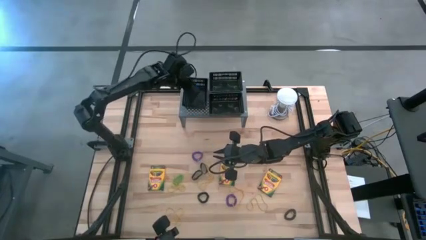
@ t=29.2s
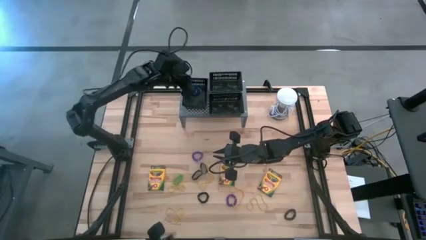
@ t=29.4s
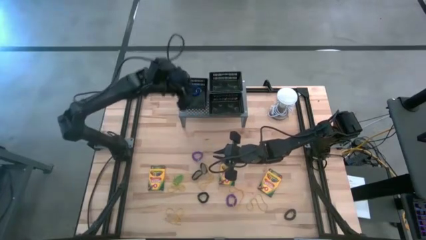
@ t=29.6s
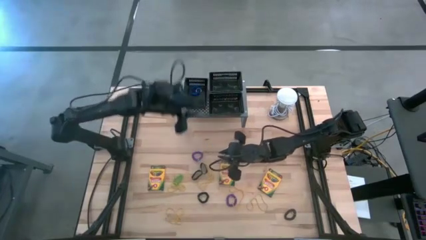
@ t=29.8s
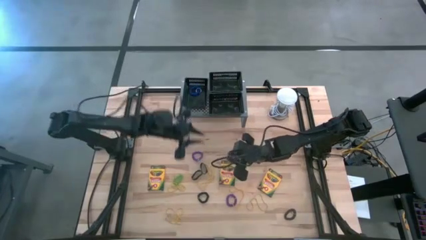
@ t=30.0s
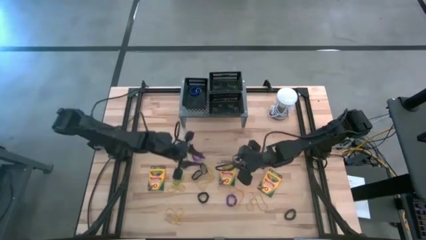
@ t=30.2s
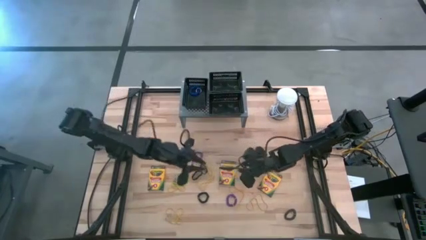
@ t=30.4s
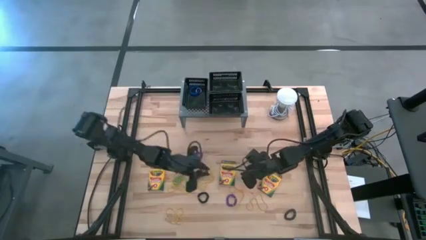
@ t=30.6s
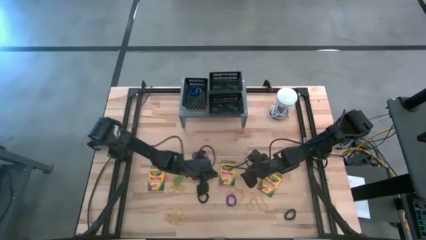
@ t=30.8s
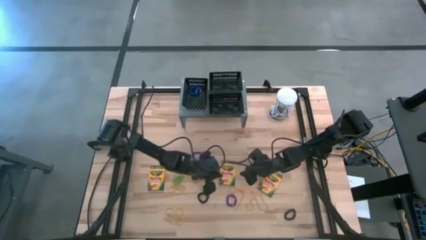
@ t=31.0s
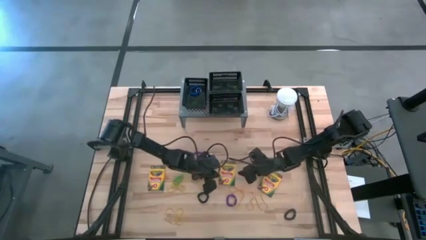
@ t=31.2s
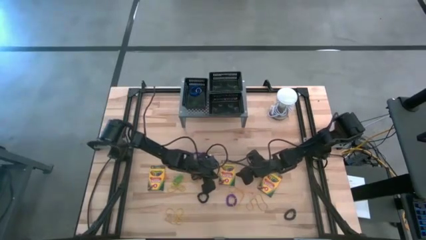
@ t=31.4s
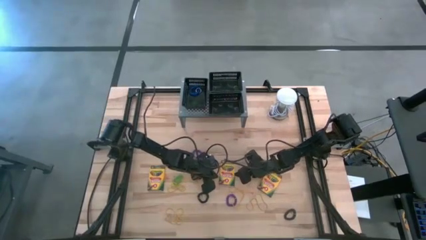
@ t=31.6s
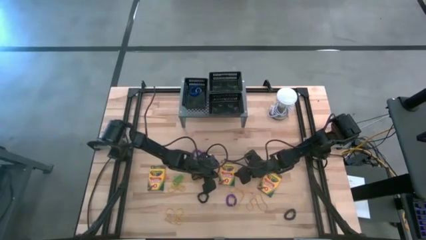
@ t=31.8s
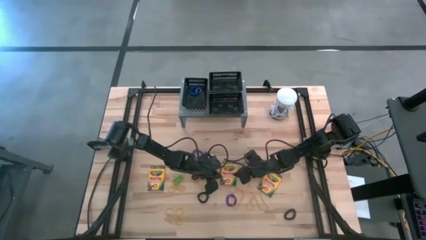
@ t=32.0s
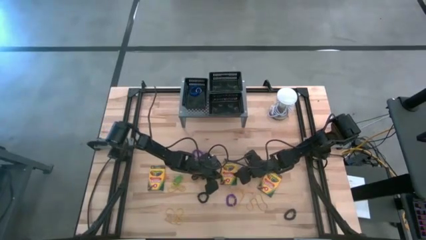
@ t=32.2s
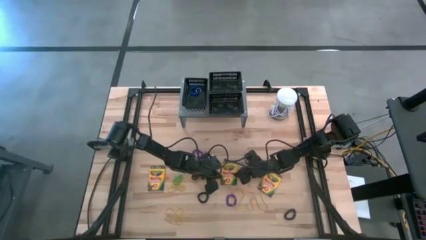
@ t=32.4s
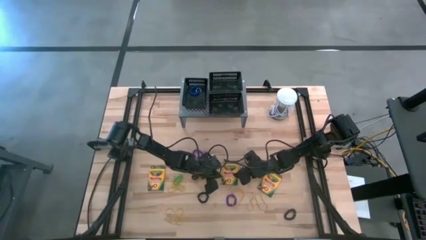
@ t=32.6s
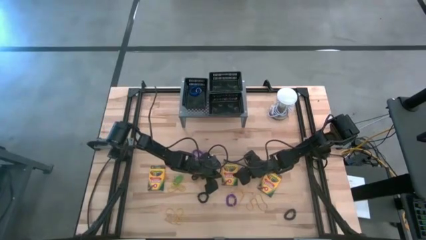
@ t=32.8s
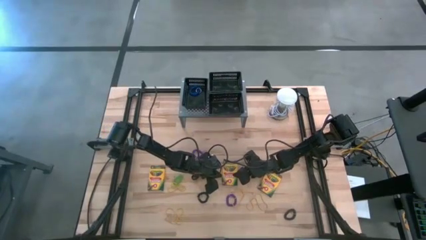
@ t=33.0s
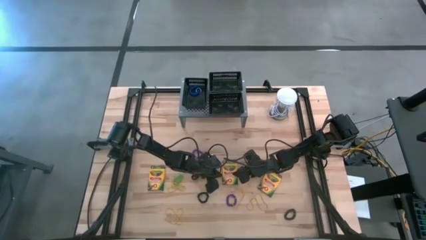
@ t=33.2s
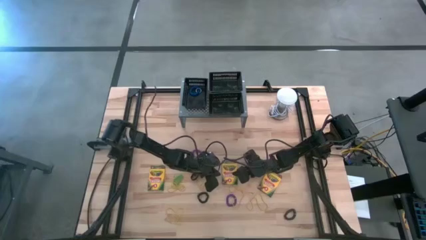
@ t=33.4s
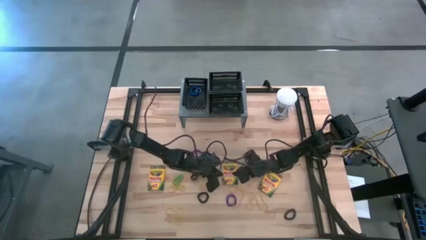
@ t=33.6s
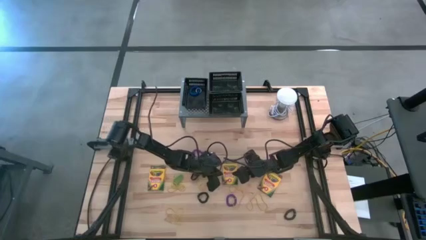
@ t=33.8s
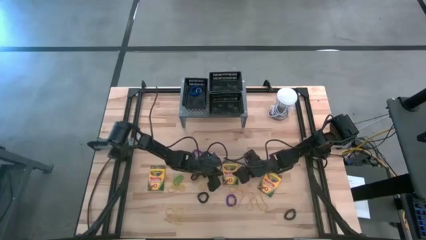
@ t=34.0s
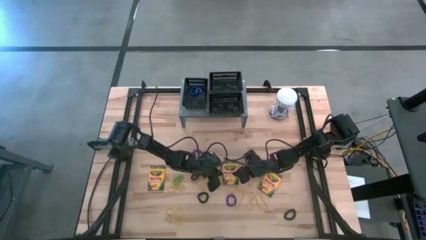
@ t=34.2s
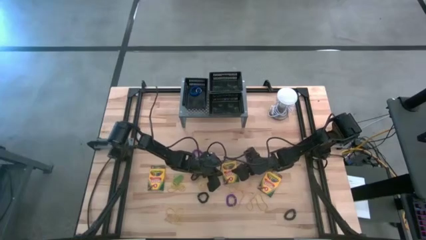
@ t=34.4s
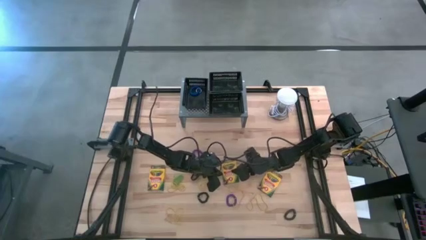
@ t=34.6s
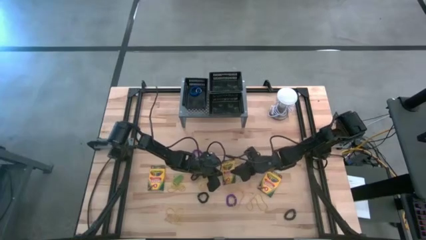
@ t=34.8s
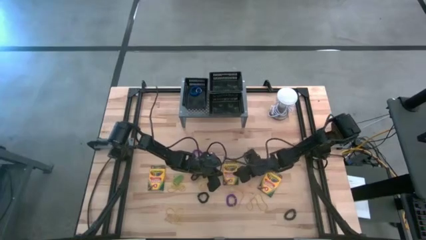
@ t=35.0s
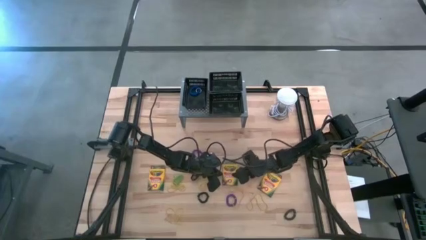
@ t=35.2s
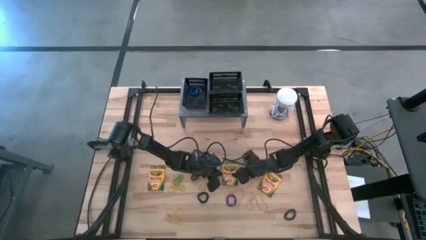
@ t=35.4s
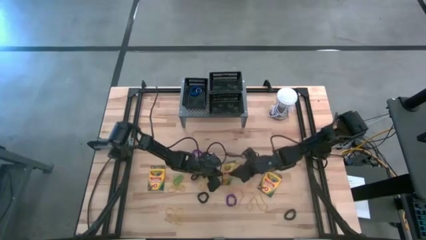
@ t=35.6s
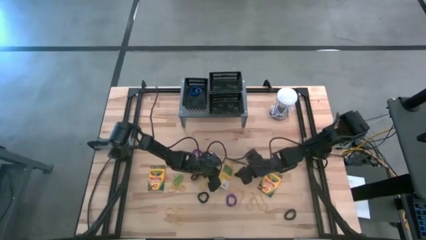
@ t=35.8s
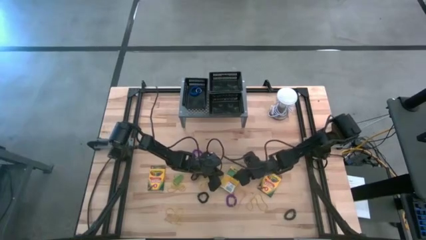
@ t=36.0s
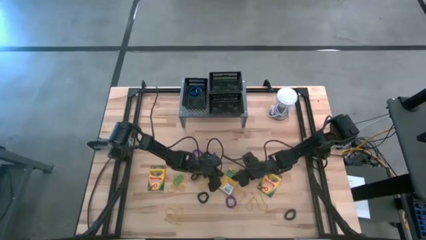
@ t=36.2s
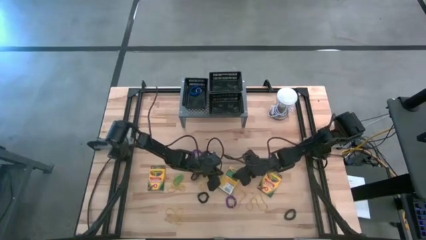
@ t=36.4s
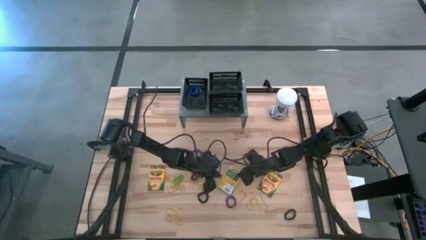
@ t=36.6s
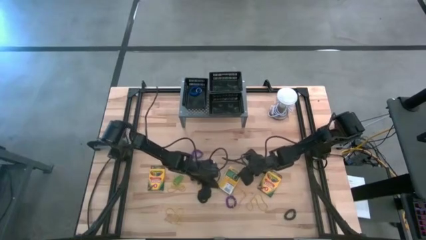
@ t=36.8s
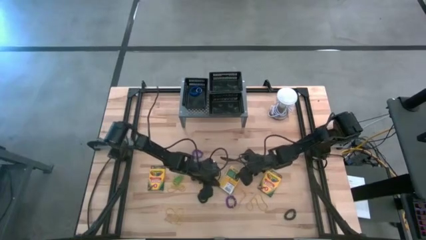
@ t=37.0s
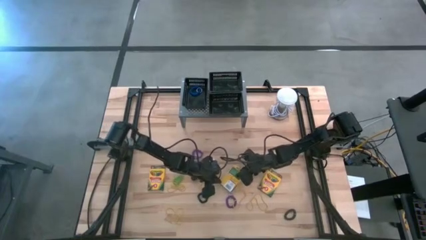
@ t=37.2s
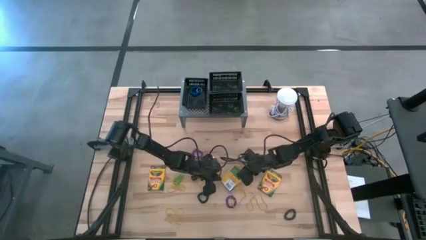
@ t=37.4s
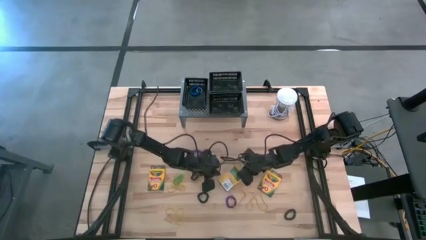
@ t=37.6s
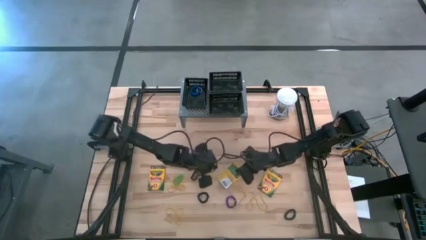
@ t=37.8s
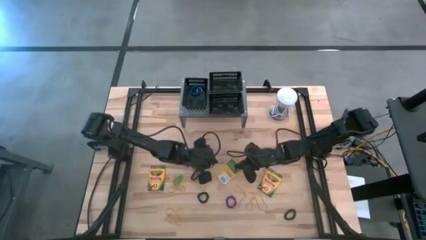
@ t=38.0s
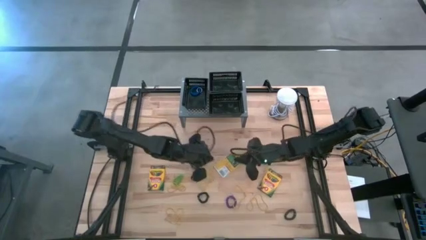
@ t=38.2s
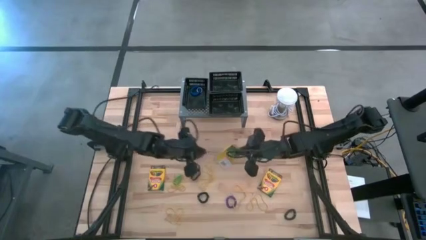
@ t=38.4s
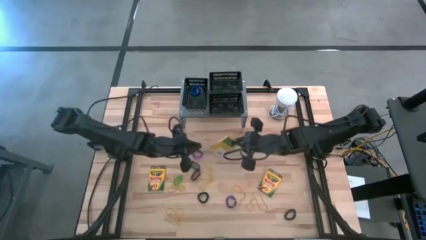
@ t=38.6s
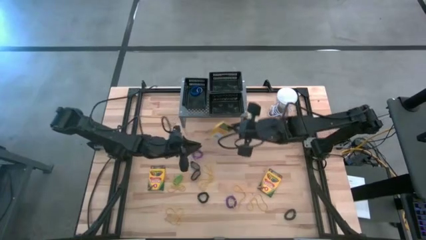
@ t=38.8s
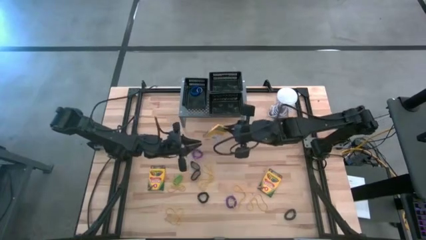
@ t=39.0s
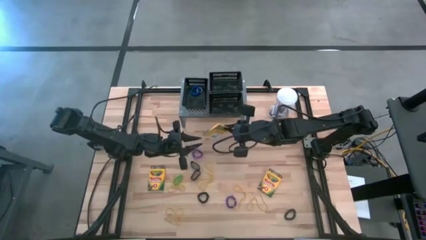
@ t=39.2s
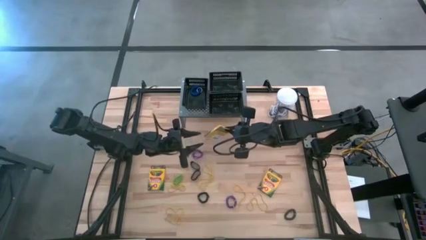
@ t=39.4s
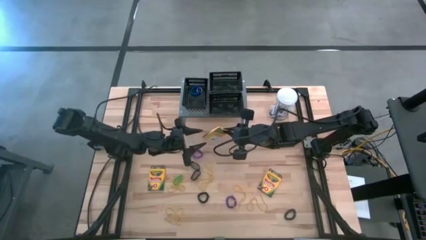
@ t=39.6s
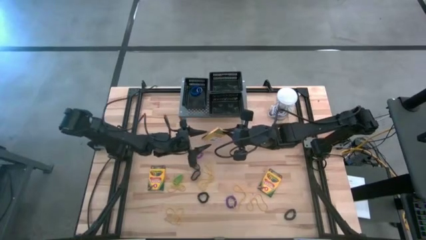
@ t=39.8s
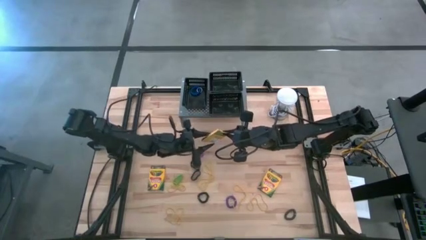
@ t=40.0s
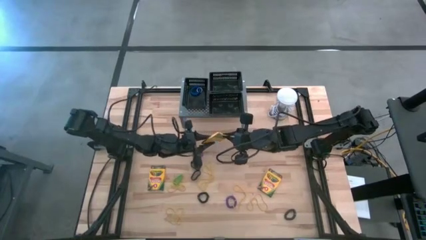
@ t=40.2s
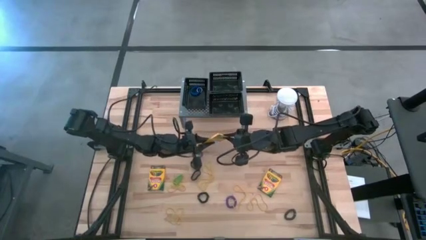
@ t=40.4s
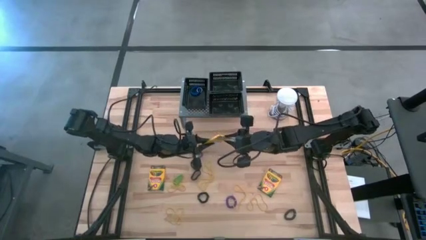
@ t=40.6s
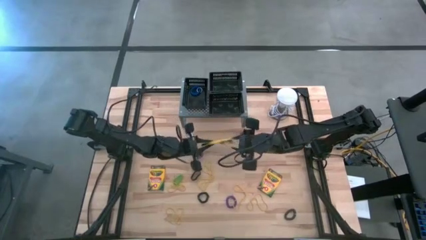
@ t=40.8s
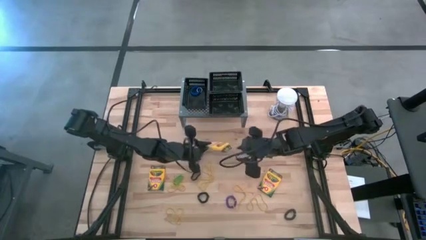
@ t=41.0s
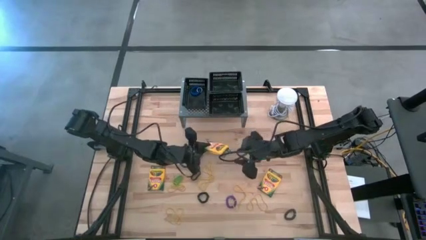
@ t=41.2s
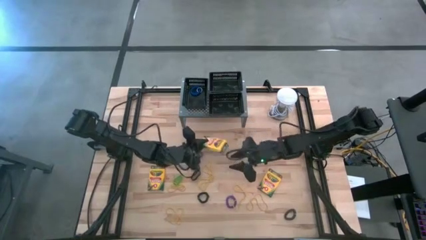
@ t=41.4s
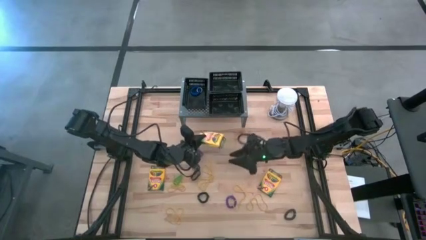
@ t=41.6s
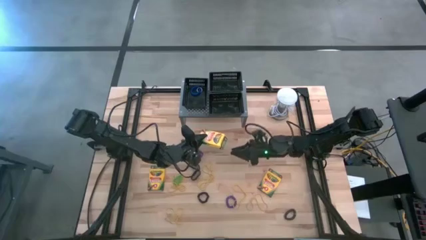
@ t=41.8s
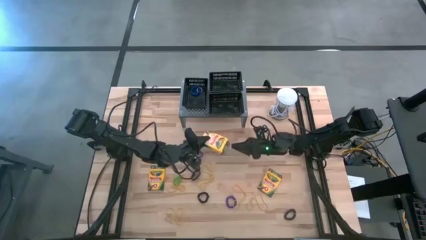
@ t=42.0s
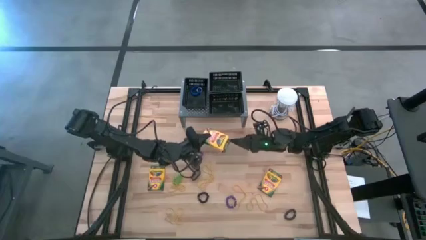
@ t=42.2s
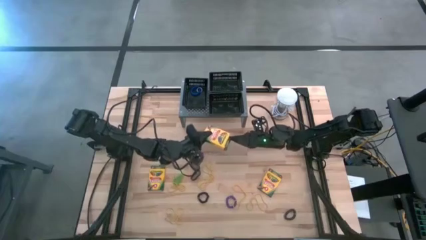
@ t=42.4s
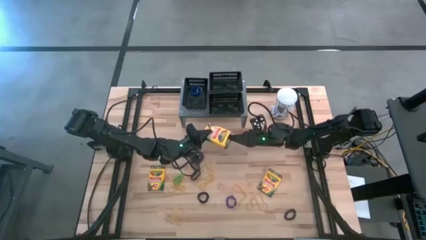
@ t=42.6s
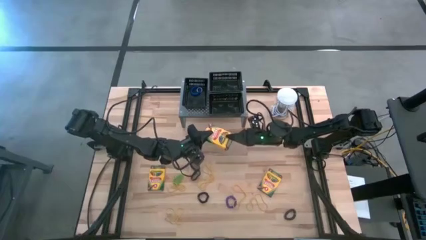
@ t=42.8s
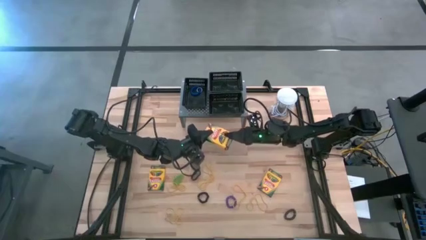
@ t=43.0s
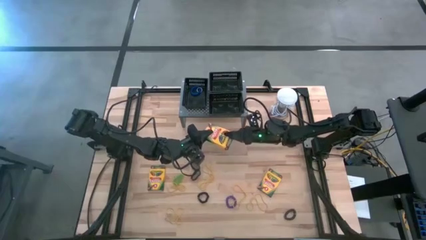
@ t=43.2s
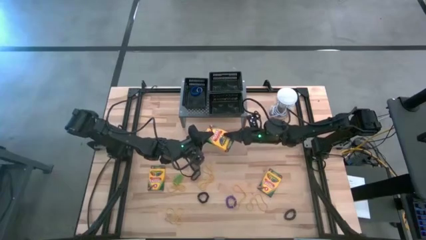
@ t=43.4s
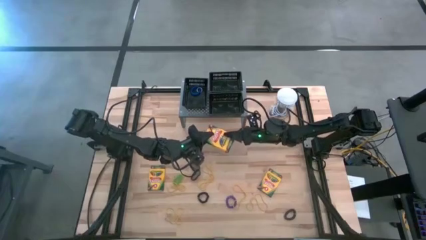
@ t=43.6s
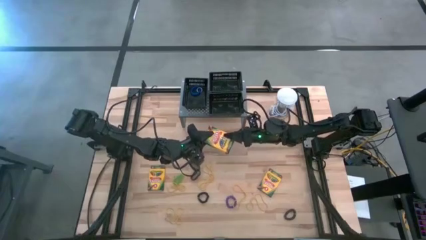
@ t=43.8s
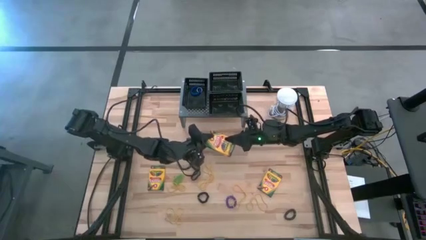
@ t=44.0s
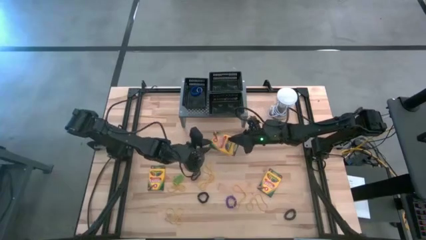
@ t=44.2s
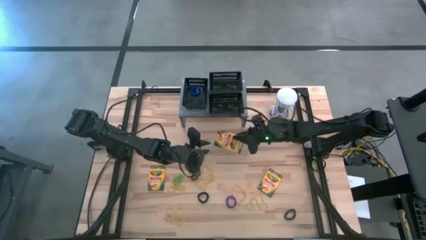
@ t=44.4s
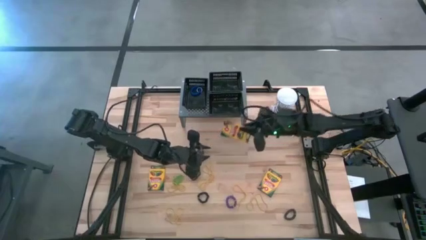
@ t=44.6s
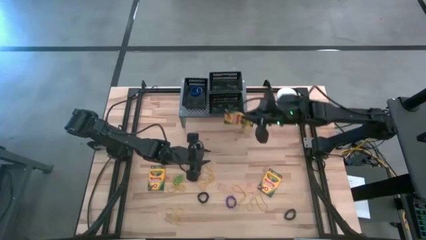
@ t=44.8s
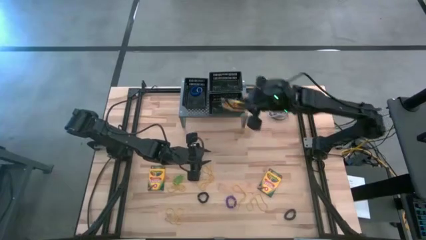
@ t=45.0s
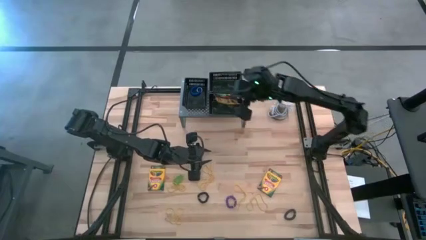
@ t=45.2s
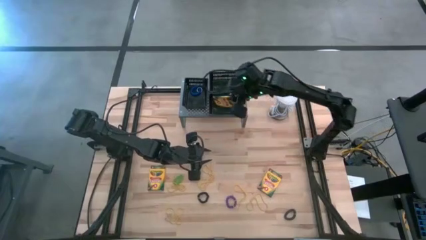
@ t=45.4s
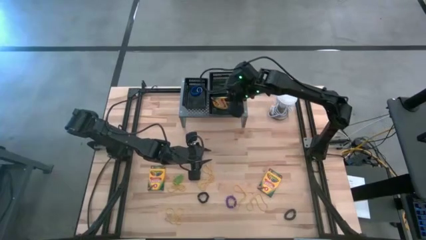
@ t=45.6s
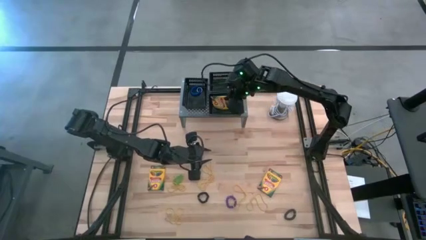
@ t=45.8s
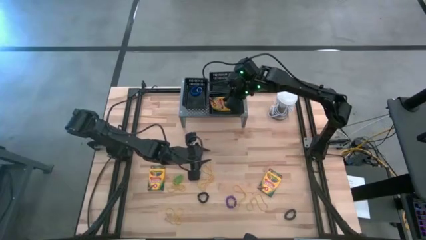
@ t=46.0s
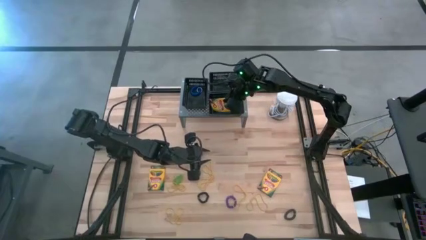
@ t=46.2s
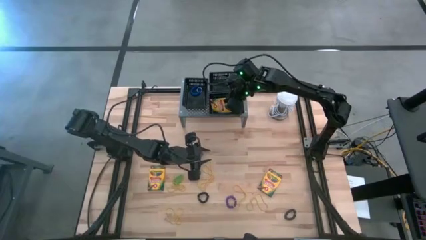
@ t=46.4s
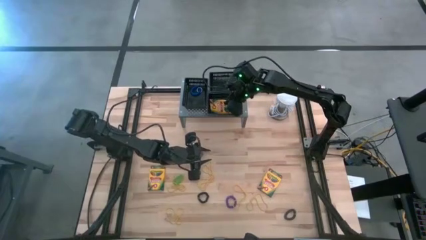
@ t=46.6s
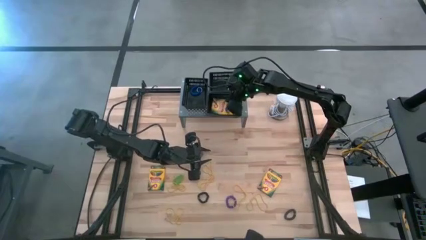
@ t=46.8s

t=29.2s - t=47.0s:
Task: Pick & Place Office Desk Supplies
Put the crayon boxes into the bottom black bin on the shelf
